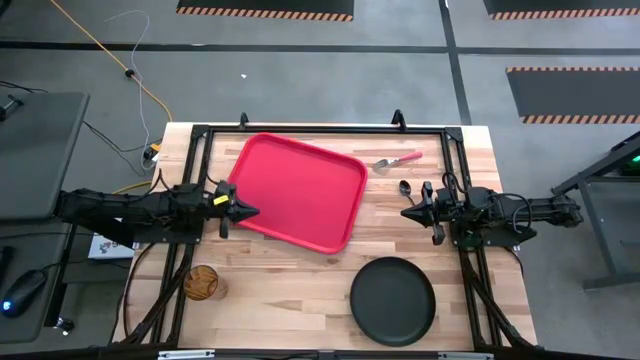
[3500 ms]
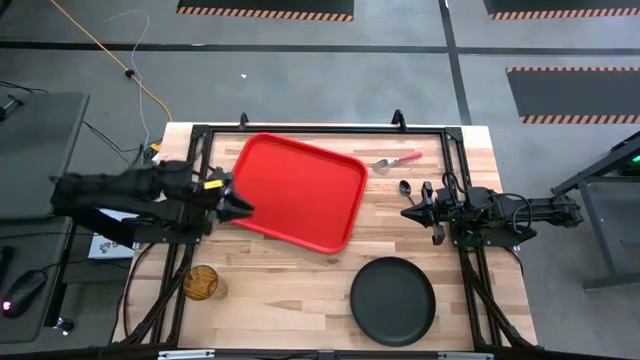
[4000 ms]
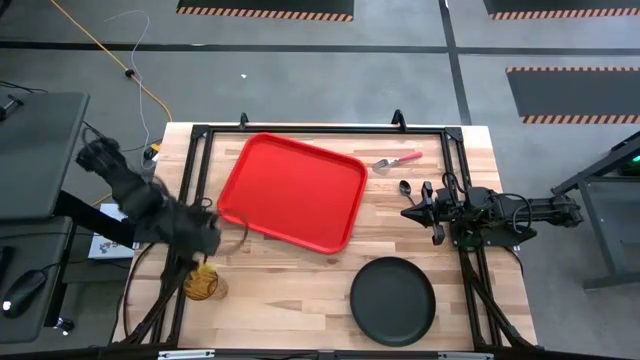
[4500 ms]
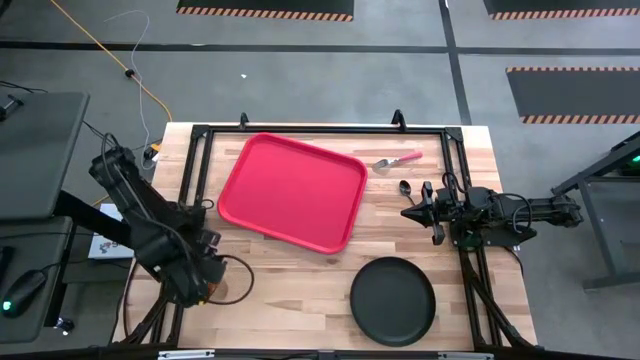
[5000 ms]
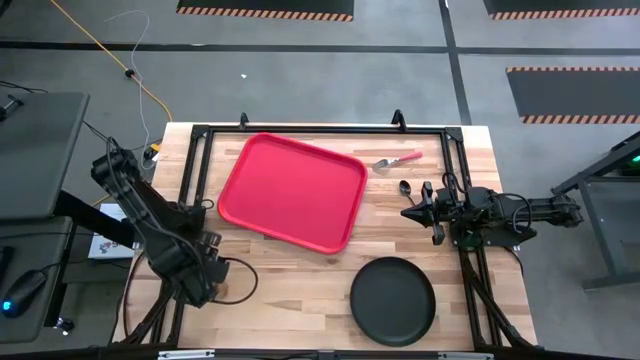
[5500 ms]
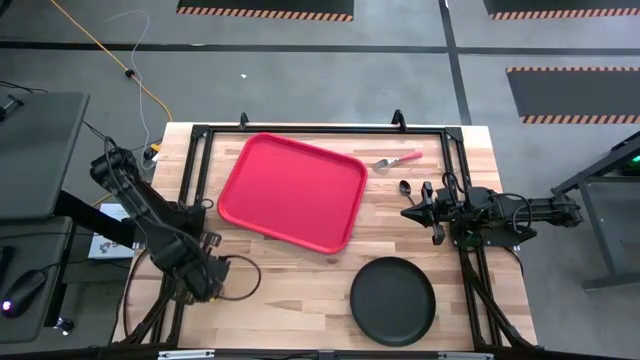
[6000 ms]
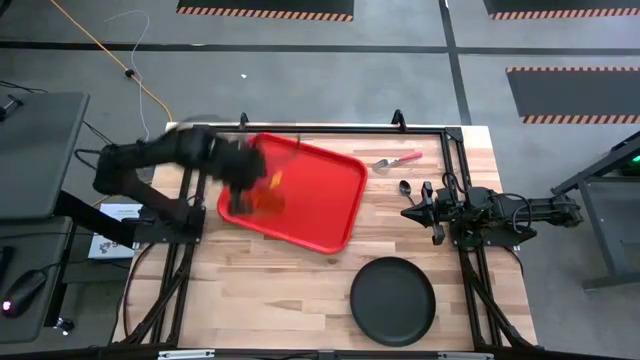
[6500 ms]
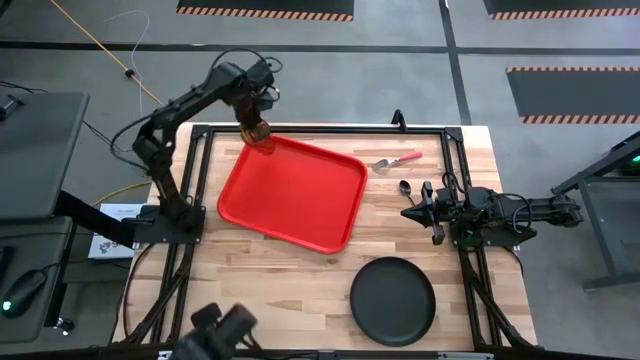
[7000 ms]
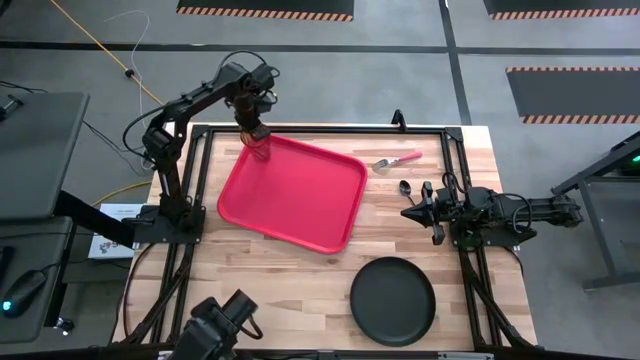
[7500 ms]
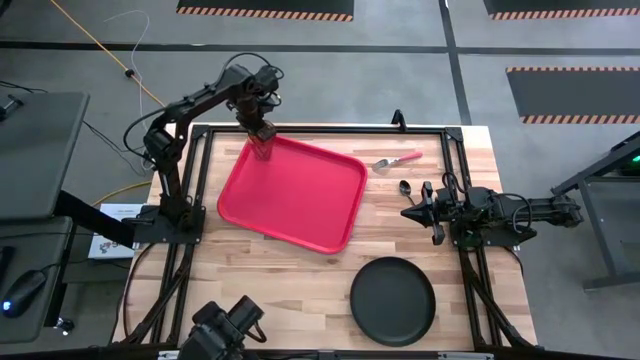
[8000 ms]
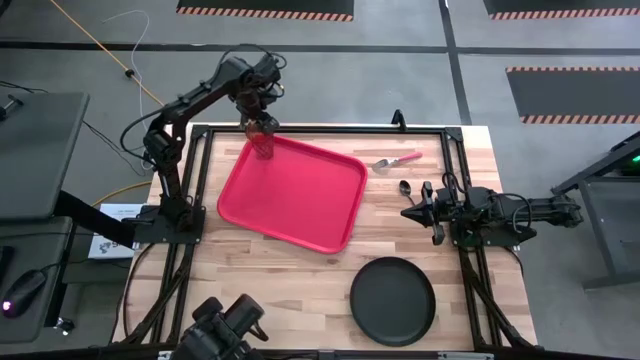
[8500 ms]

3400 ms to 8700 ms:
Task: Pick and place plate/cup/fork/spoon on tray
Put the yellow cup on the red serving tray

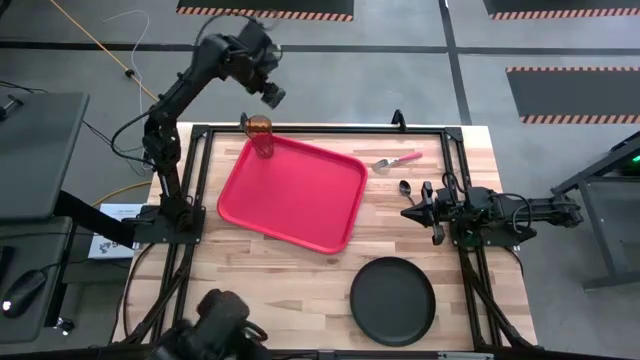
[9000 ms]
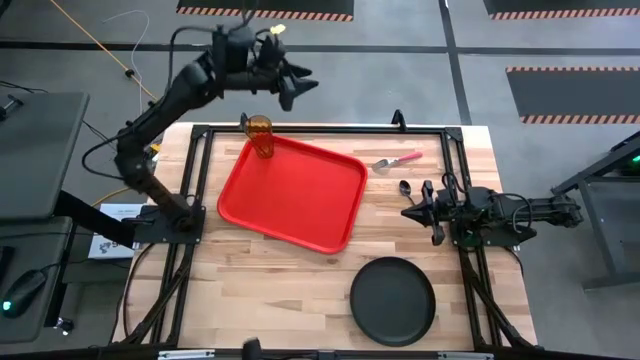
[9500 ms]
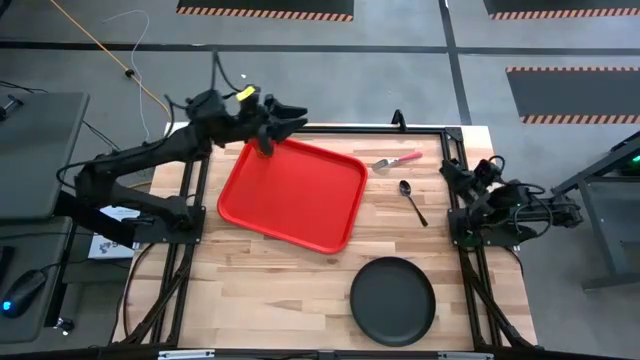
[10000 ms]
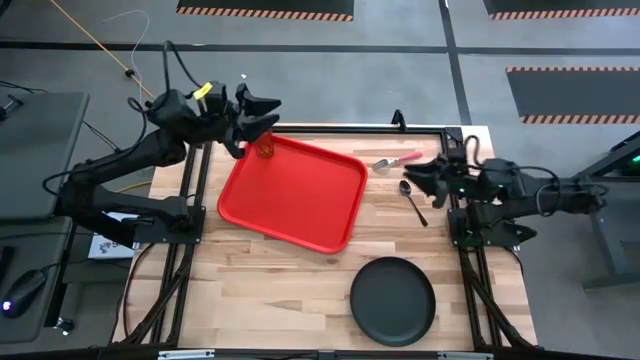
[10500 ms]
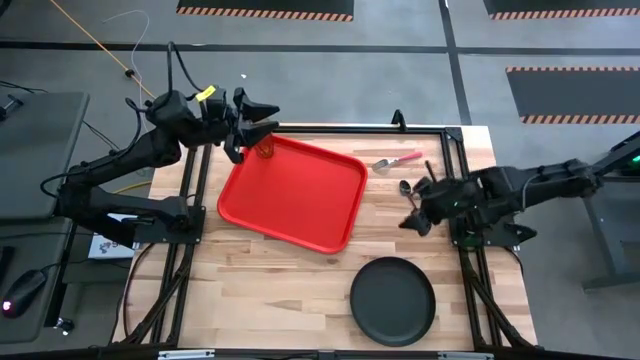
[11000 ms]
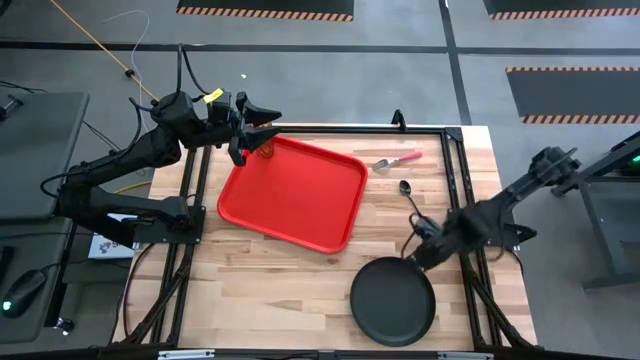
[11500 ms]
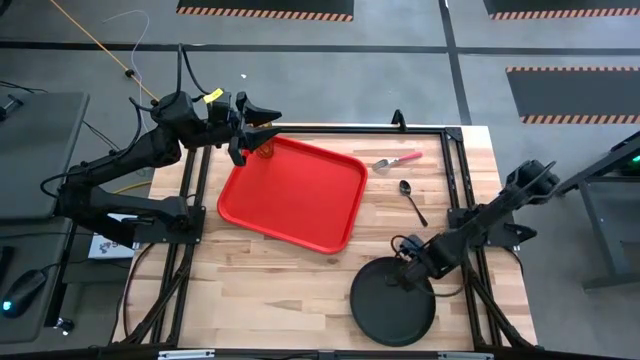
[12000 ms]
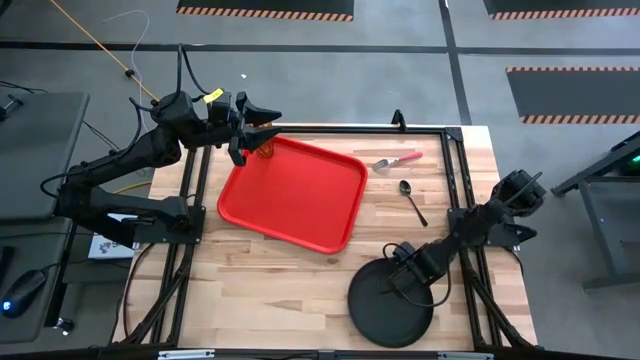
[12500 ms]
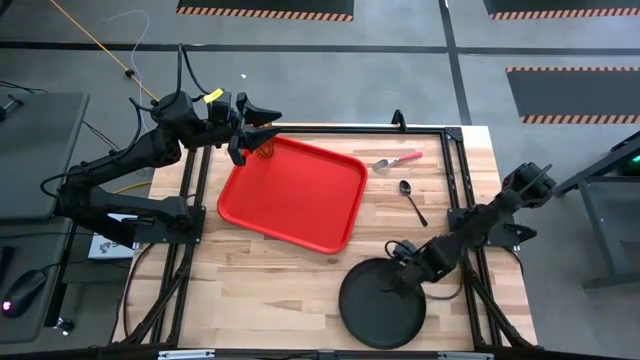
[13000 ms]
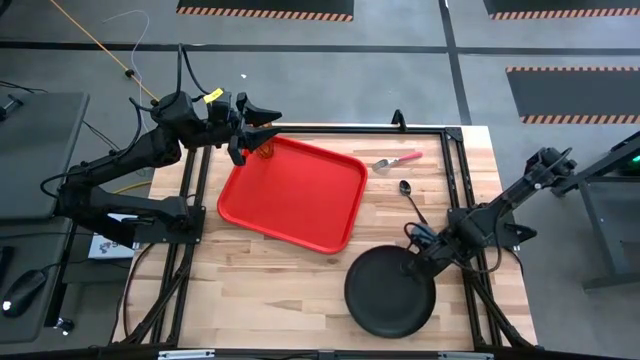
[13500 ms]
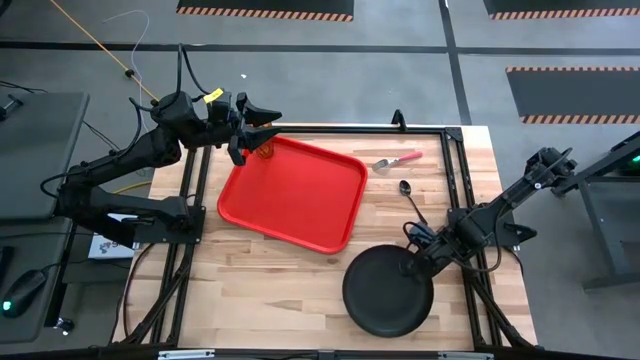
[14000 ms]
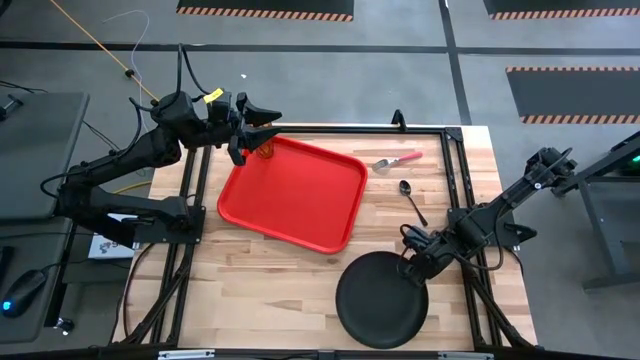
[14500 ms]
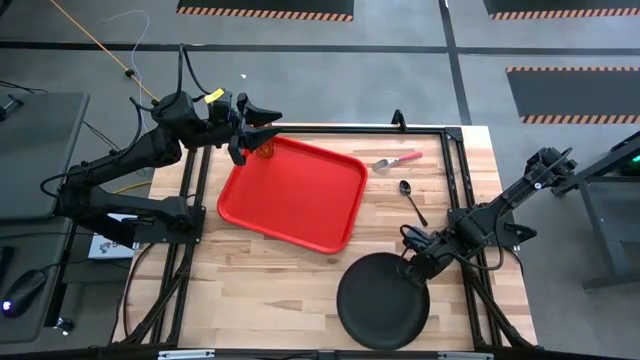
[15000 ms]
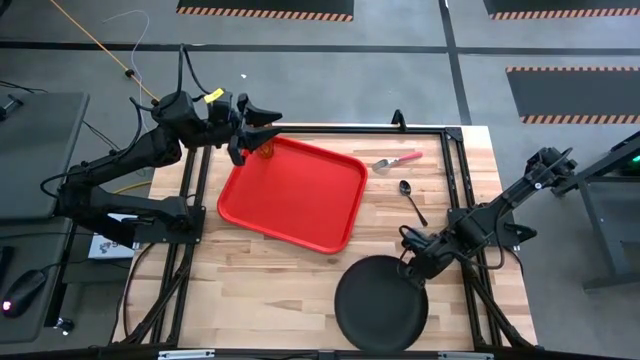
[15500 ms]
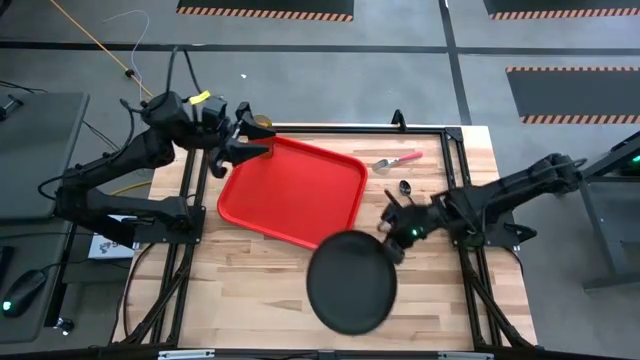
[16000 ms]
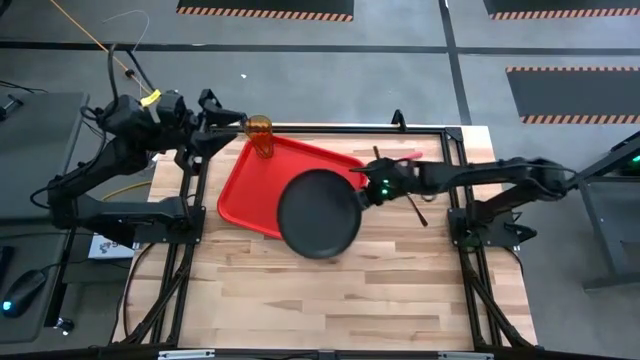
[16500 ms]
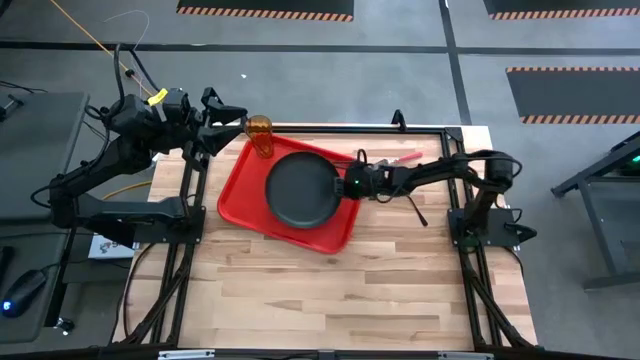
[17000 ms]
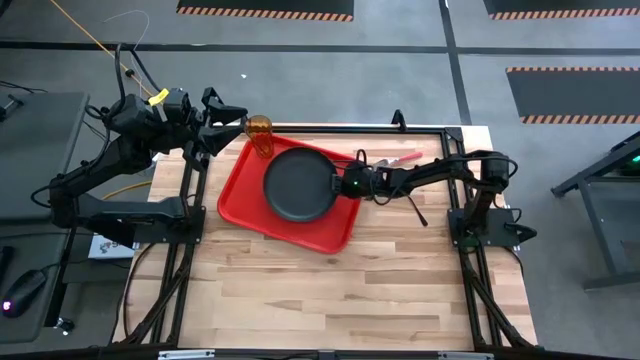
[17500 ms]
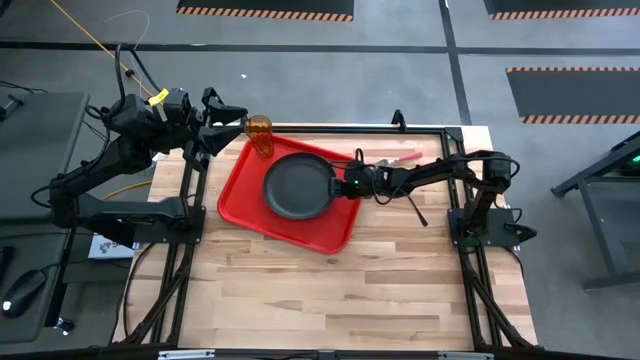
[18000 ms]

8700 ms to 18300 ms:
Put the black plate on the red serving tray

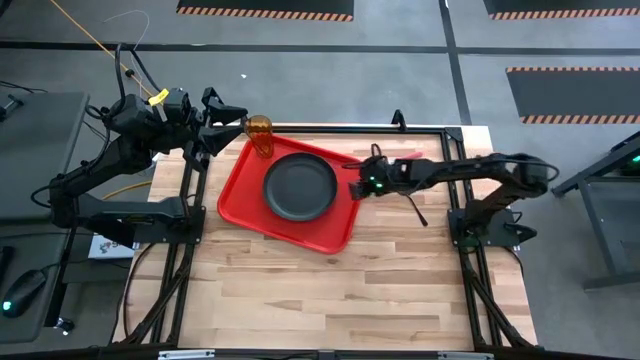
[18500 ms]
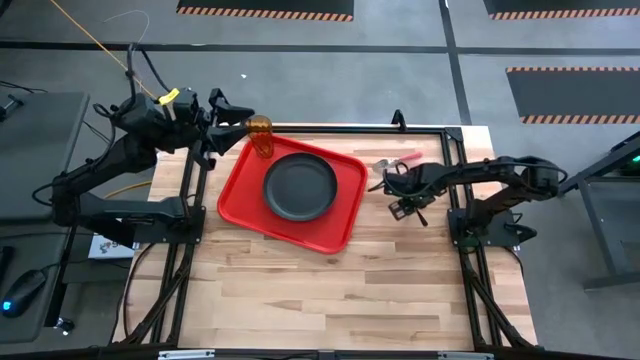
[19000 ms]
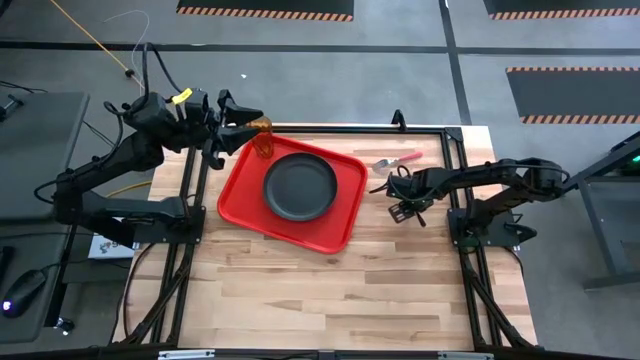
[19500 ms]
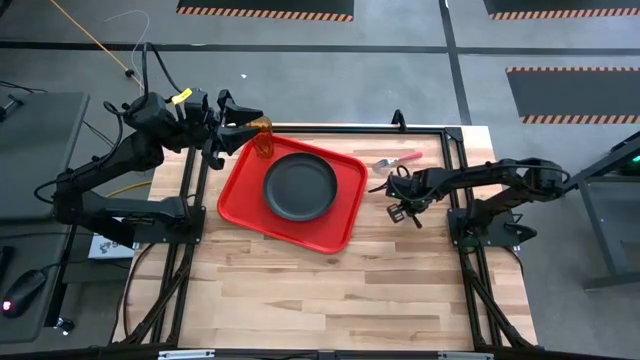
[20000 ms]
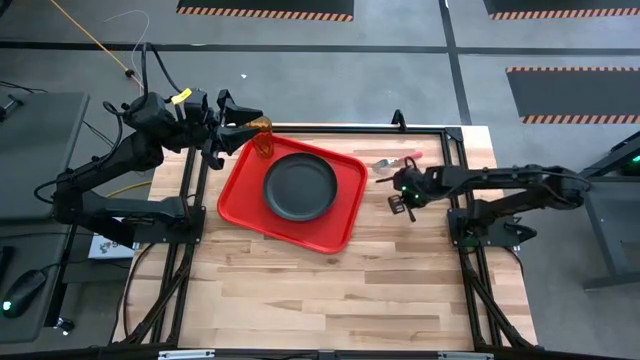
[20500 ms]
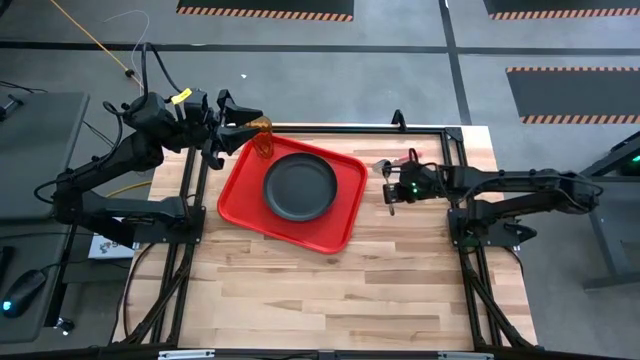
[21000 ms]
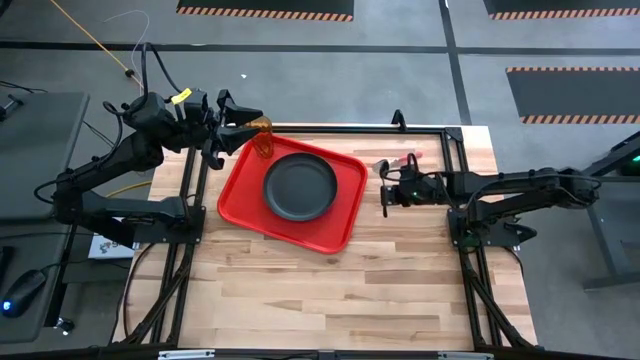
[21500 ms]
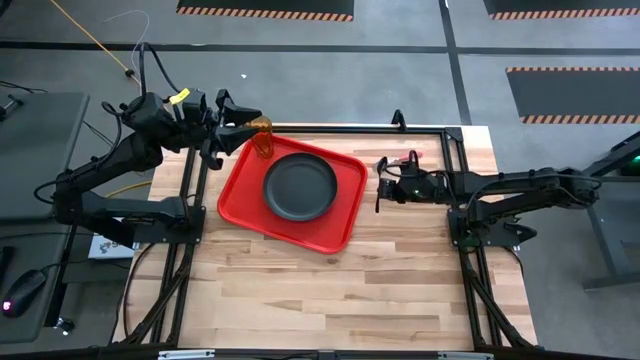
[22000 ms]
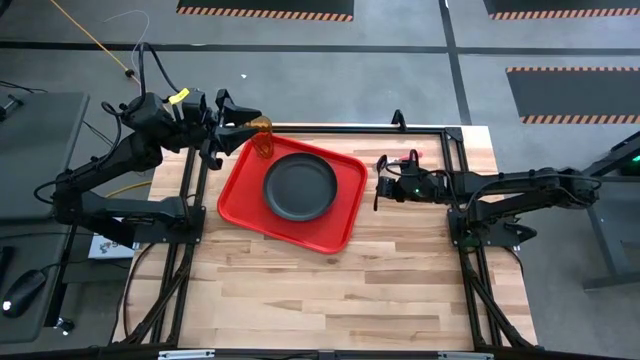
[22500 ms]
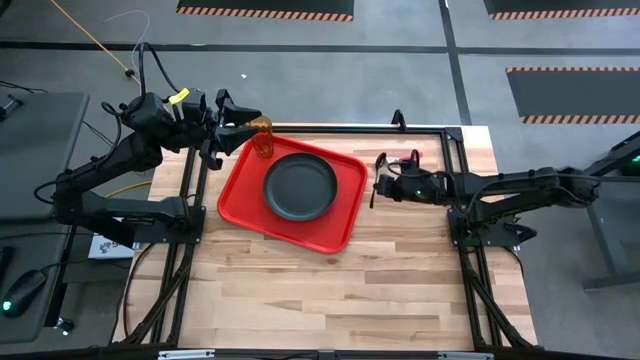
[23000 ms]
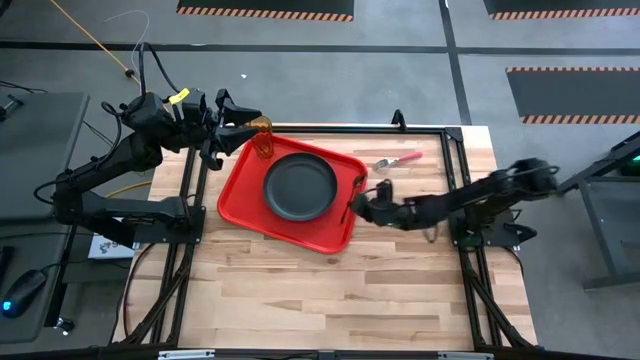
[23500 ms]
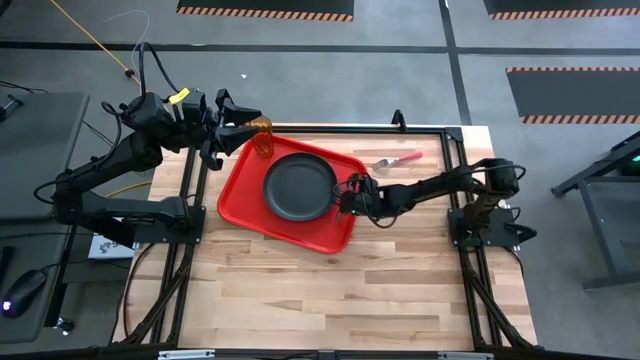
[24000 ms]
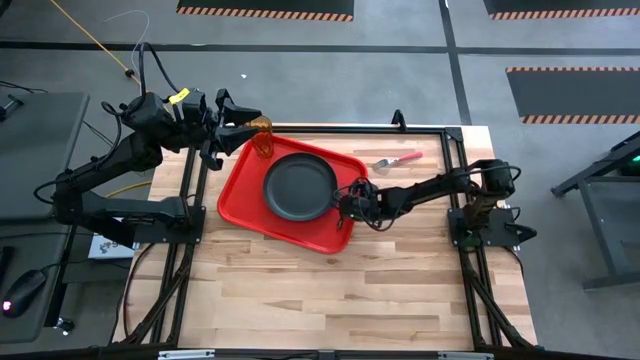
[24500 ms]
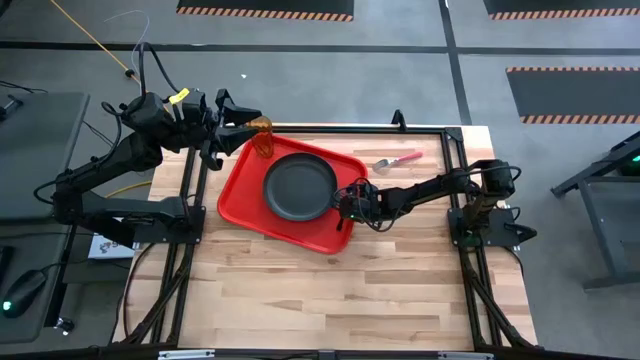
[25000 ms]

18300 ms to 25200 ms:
Put the black spoon on the red serving tray
